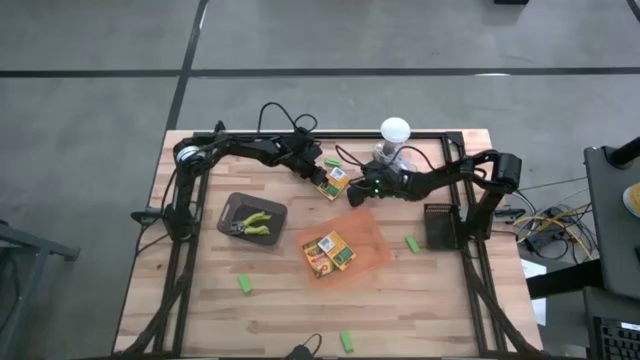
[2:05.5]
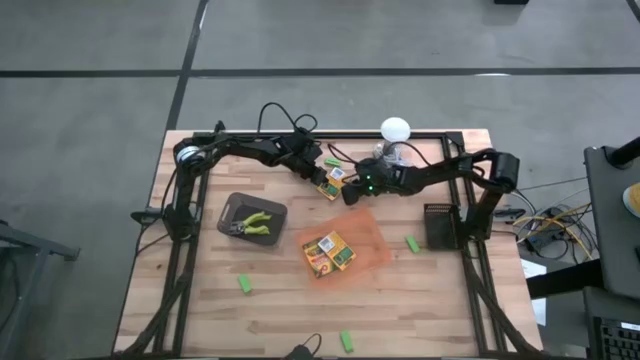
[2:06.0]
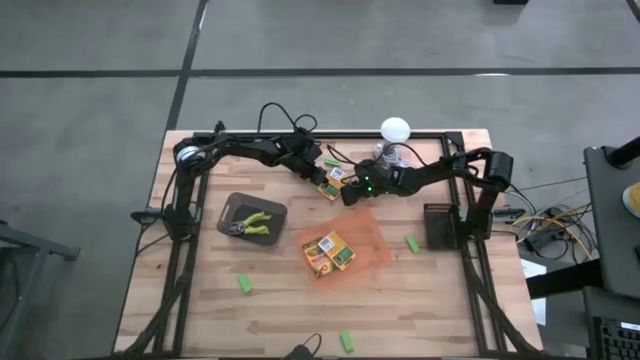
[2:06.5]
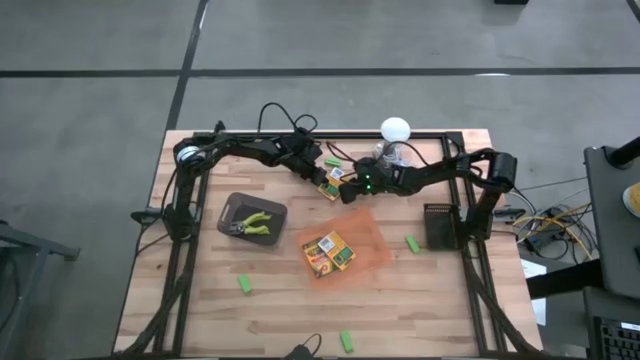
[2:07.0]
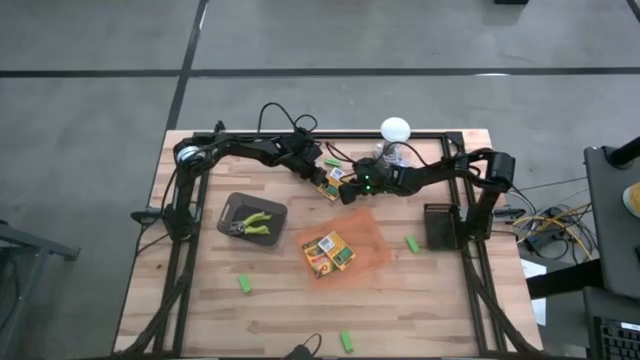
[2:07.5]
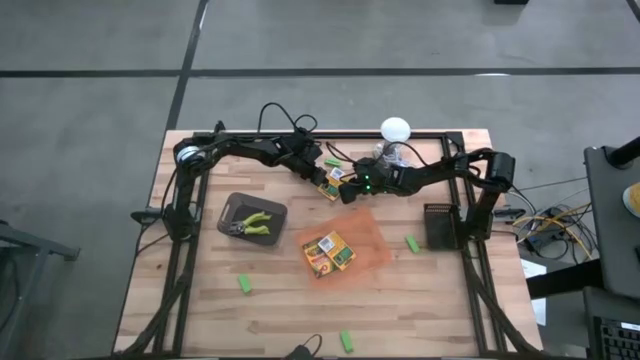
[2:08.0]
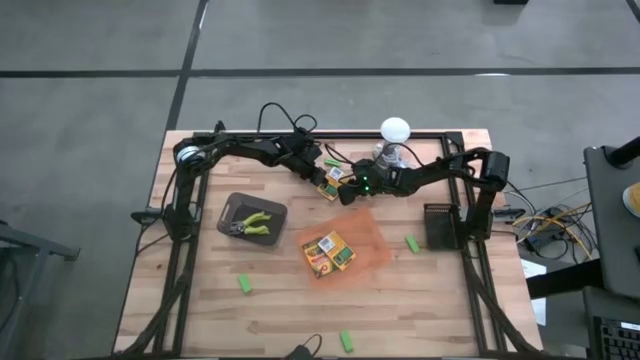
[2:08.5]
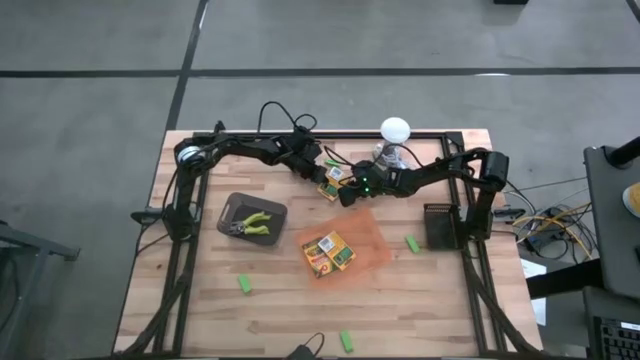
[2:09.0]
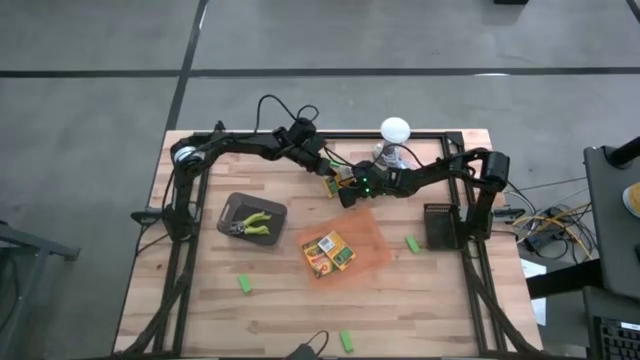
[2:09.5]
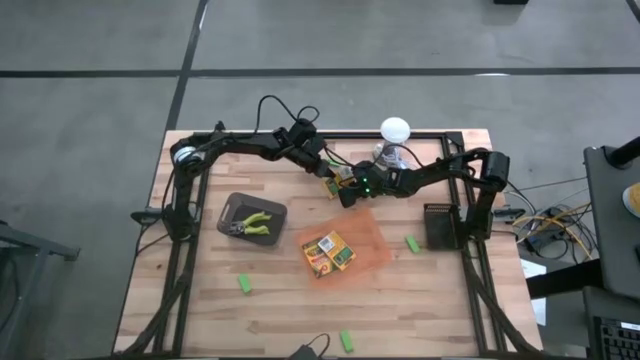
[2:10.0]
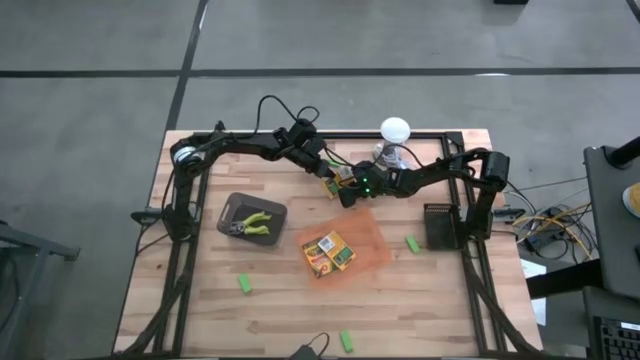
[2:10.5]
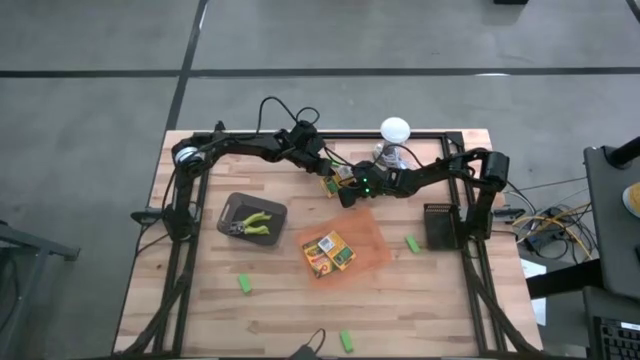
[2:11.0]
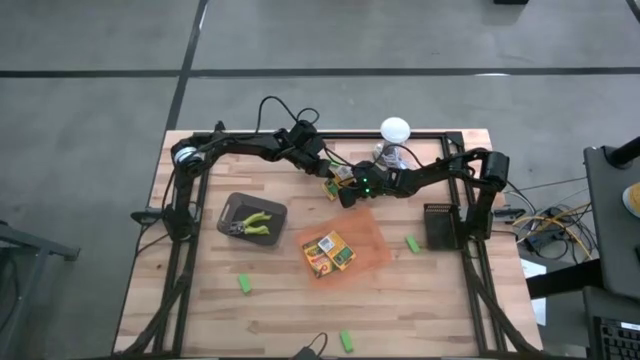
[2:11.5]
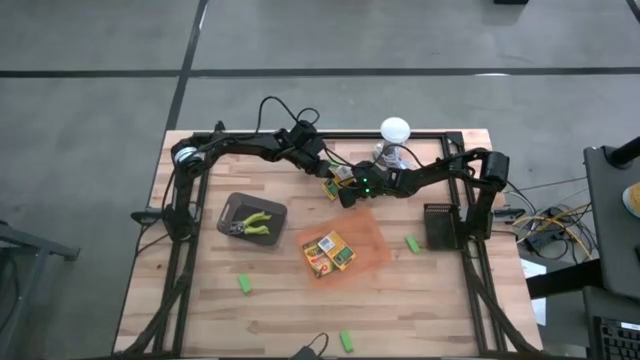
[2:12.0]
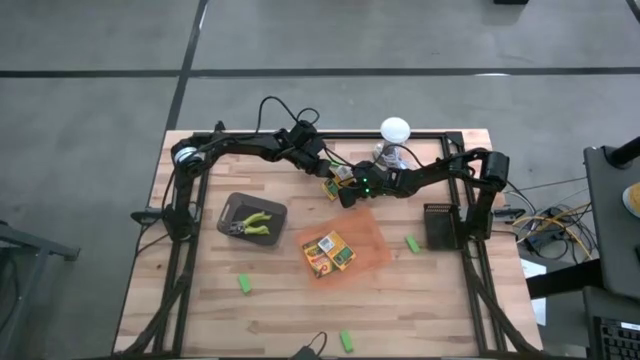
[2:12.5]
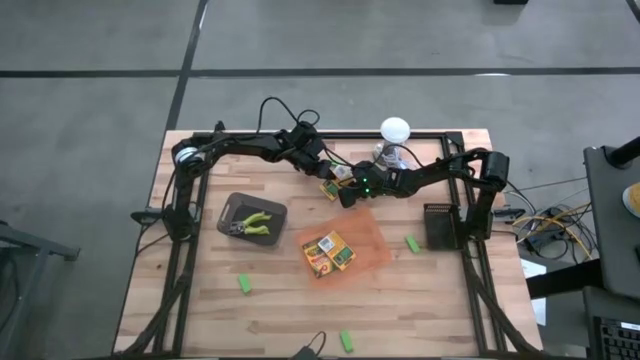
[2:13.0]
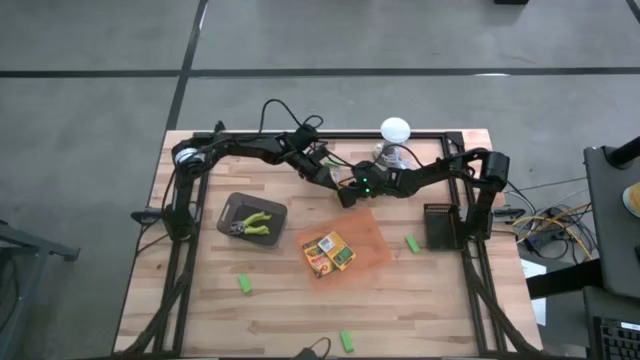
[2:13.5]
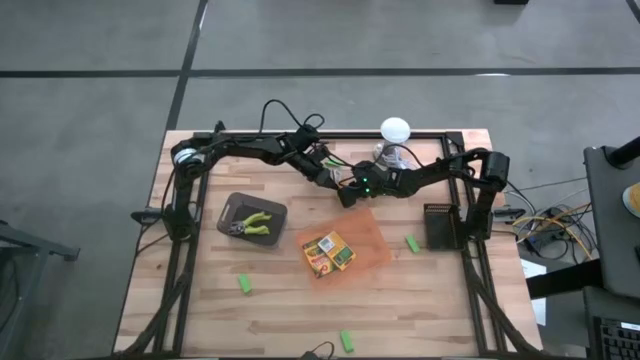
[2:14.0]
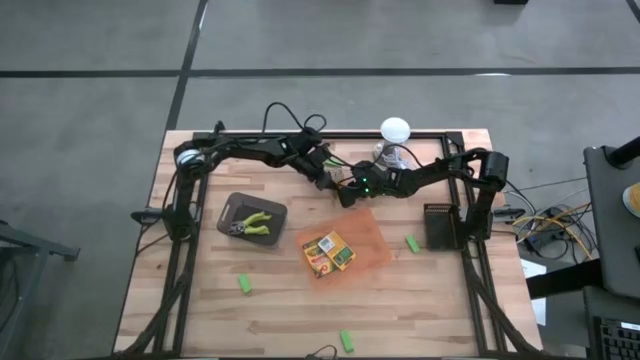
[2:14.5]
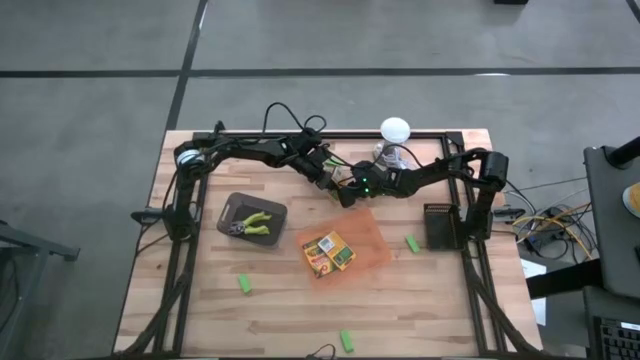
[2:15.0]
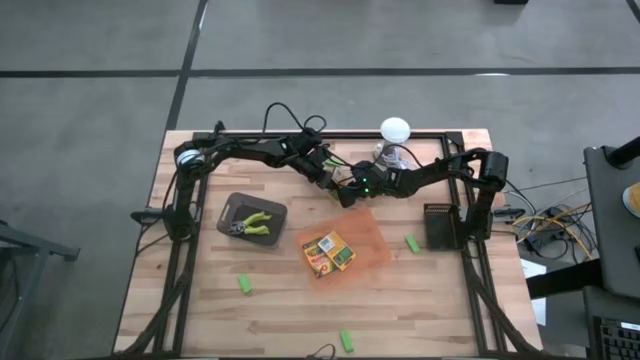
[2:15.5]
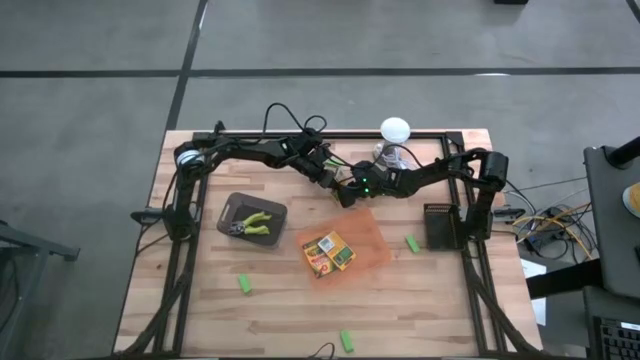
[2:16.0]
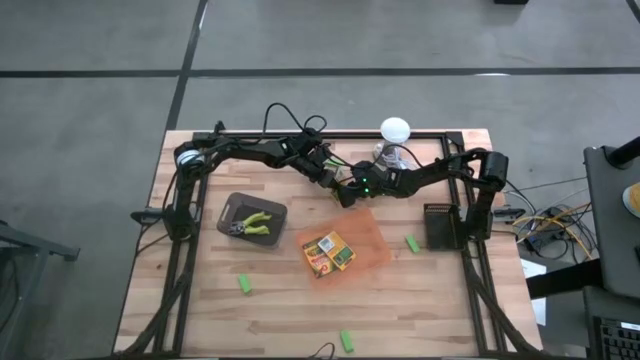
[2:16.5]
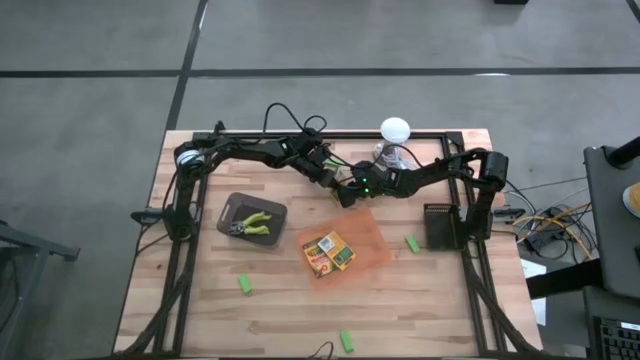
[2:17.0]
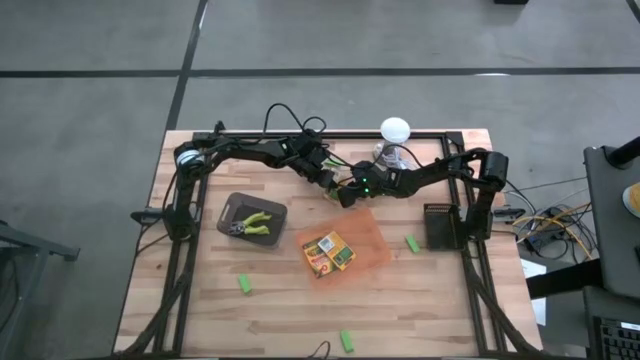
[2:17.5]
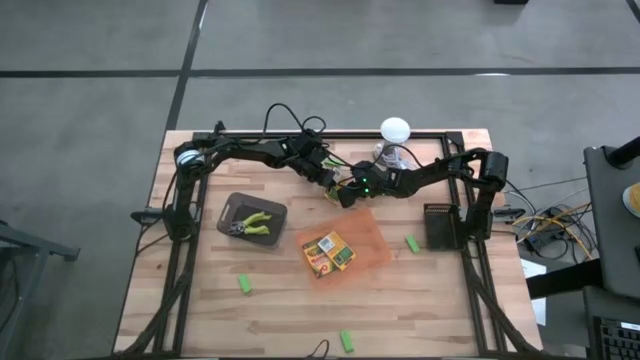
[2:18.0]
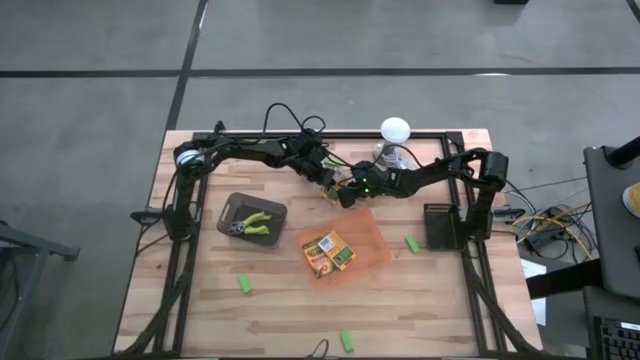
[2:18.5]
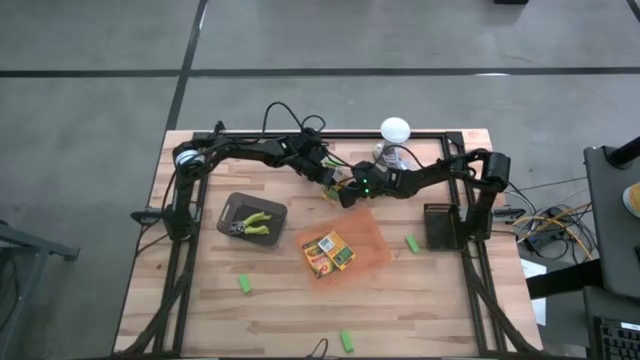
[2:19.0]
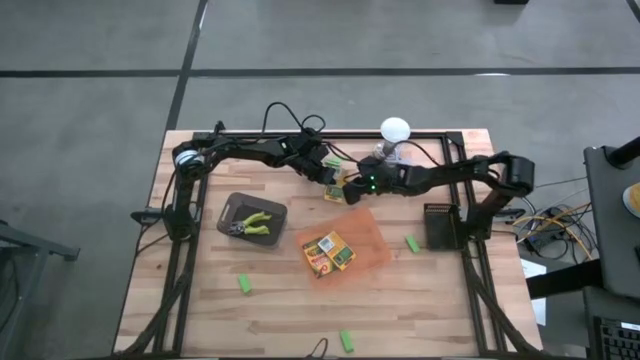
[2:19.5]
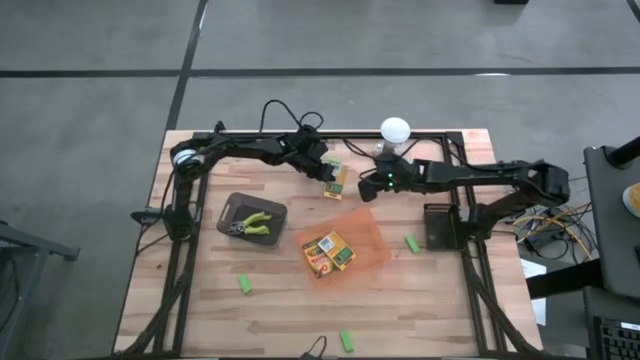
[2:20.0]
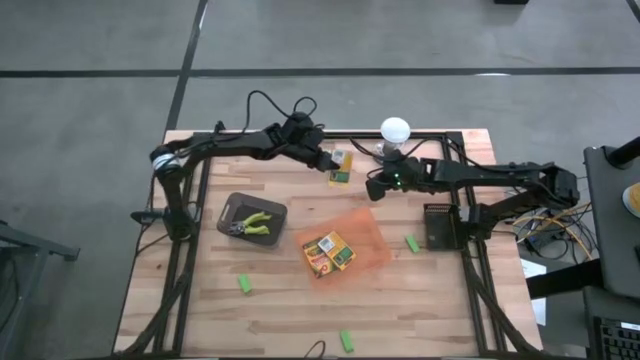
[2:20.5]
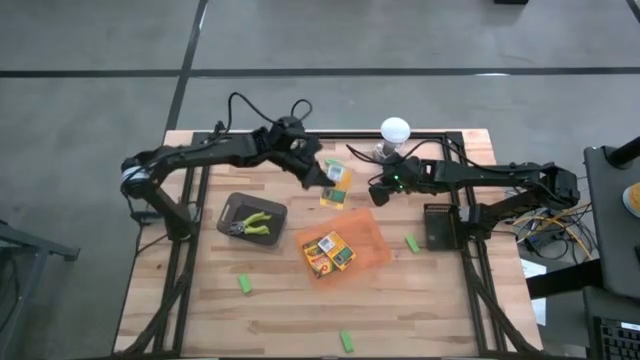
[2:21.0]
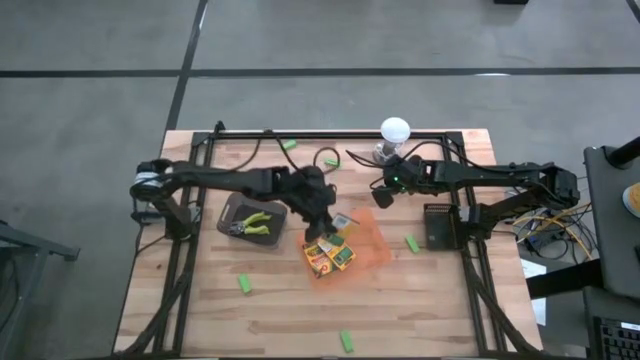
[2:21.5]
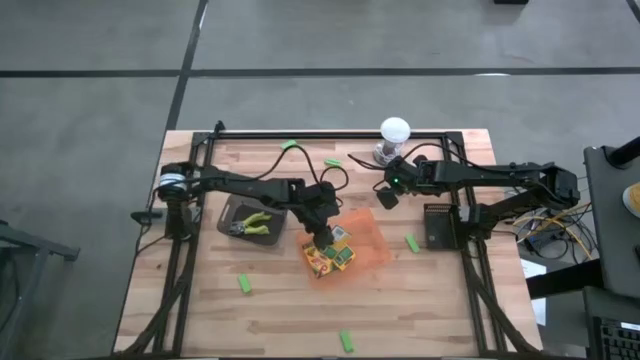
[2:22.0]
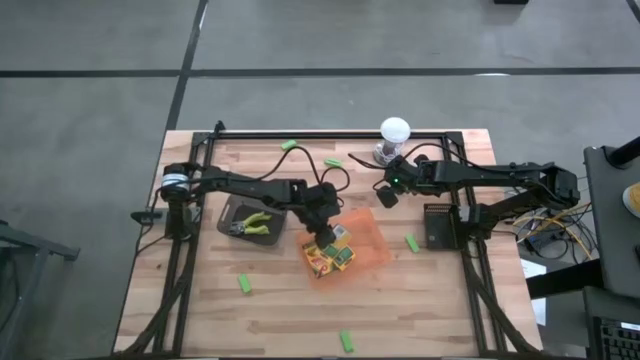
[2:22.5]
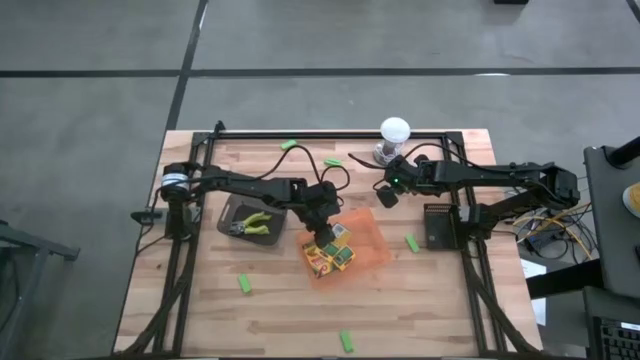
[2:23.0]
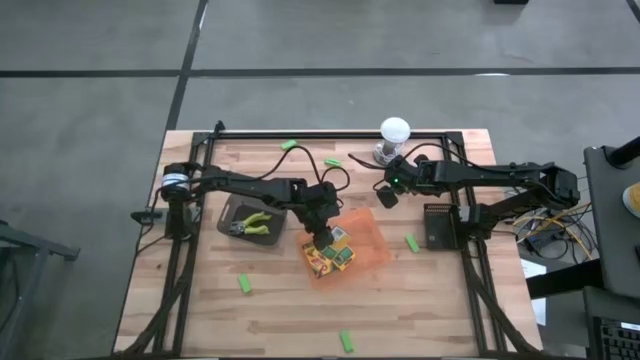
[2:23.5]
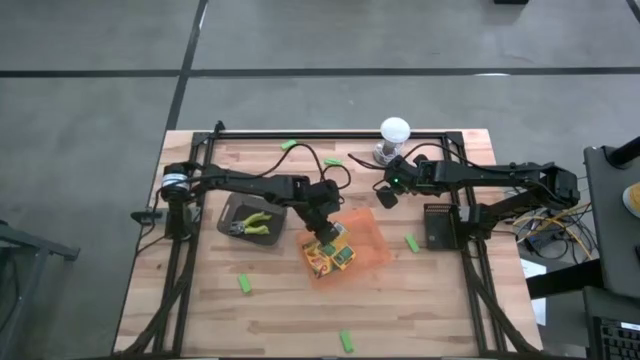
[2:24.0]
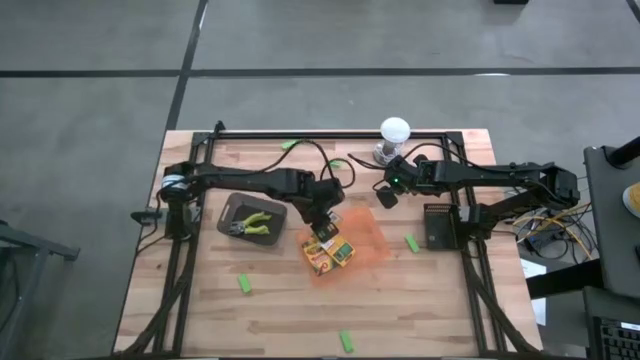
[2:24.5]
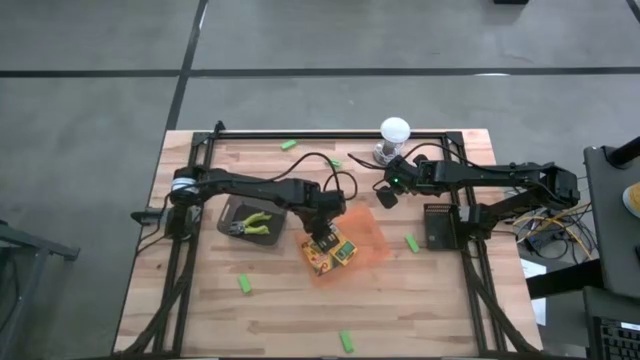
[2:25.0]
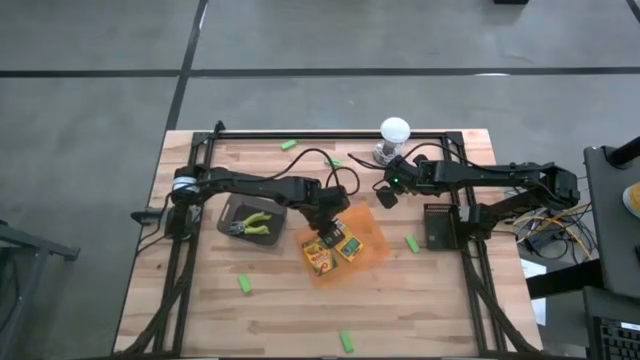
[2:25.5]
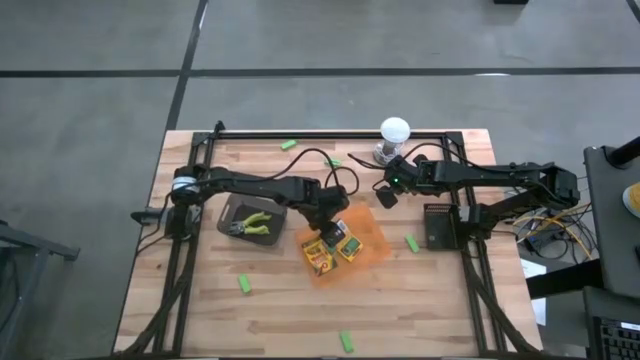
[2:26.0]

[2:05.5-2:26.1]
Task: Pick & Place School Supplies
Put the crayon box into the orange bin

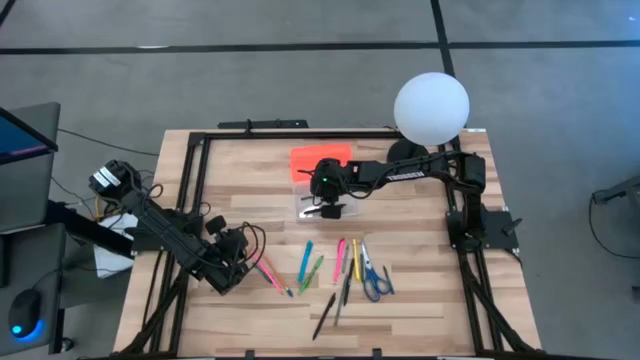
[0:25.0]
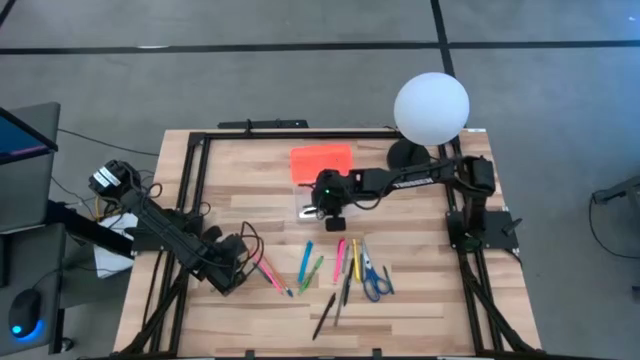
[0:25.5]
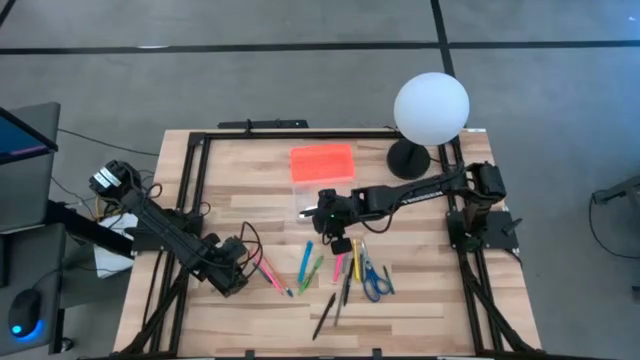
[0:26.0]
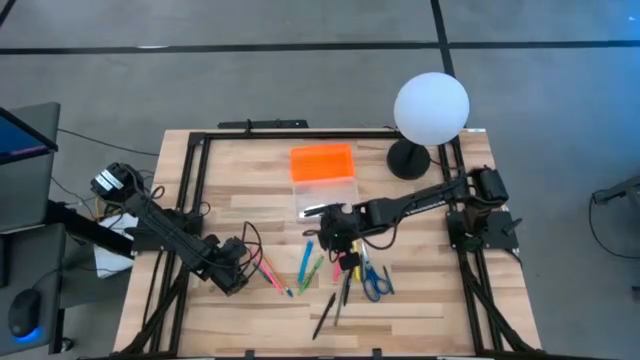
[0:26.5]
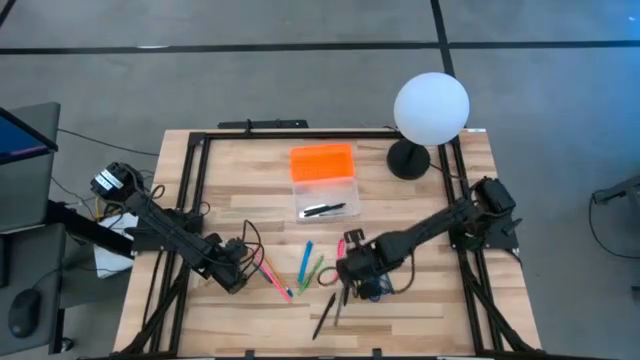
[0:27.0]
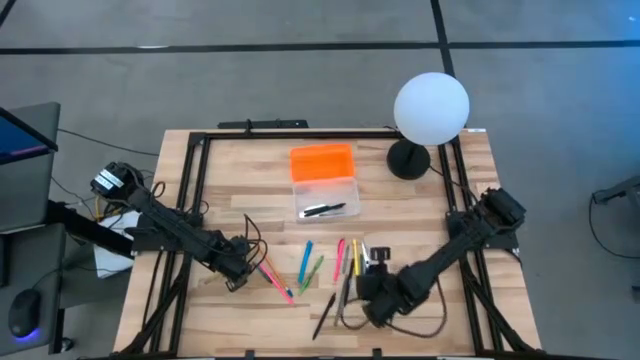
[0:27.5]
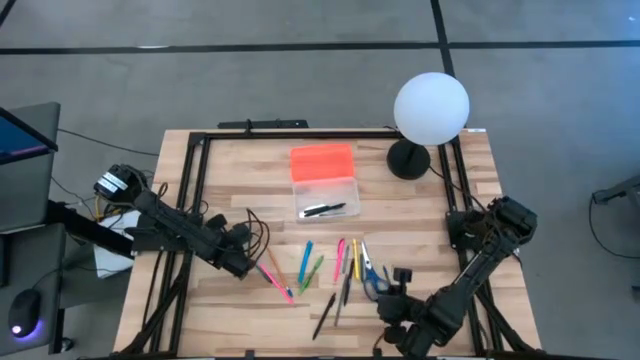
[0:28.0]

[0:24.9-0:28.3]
Task: Pick & place school supplies into a supply box
Put the yellow pencil into the supply box
